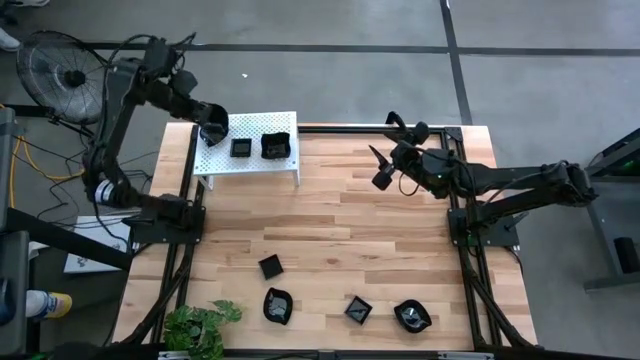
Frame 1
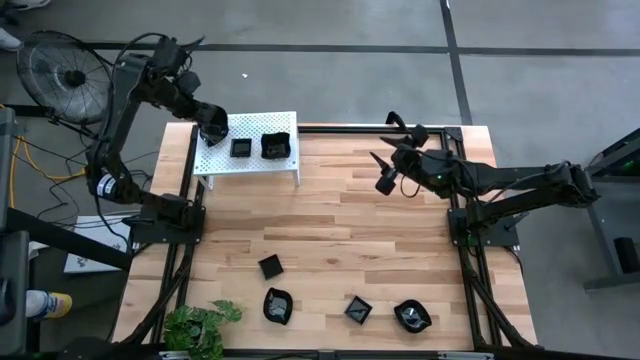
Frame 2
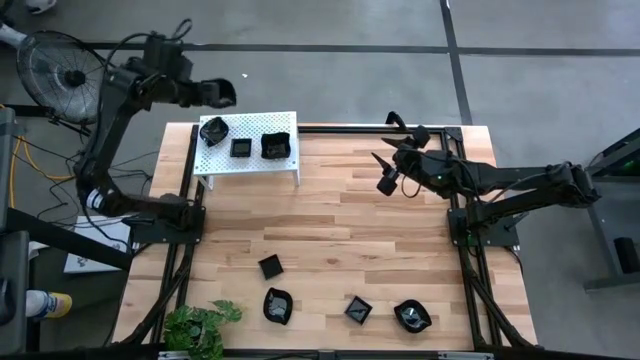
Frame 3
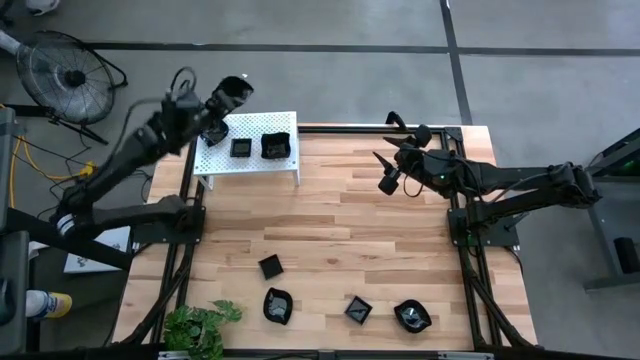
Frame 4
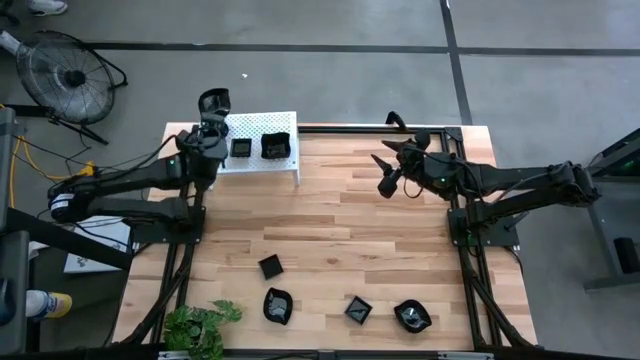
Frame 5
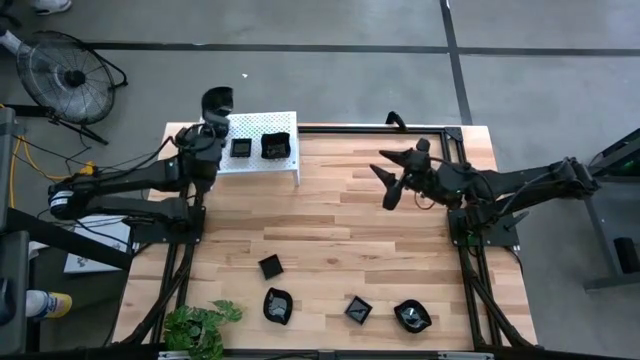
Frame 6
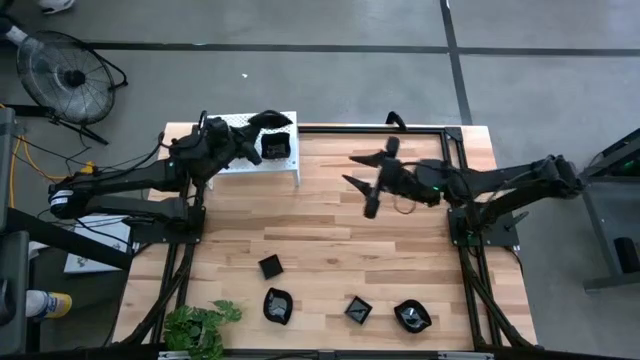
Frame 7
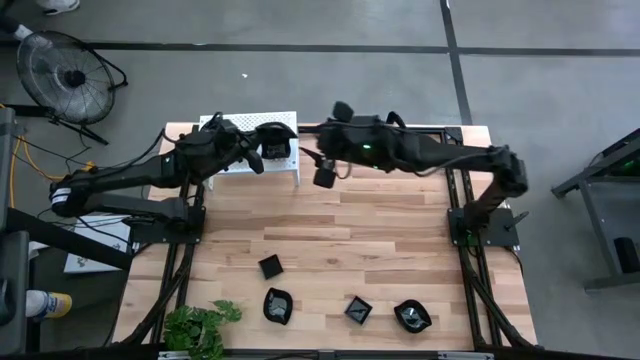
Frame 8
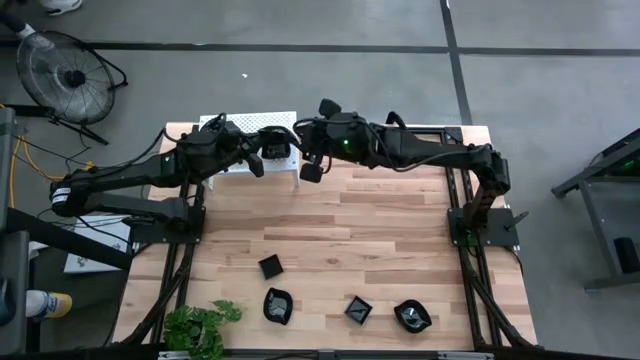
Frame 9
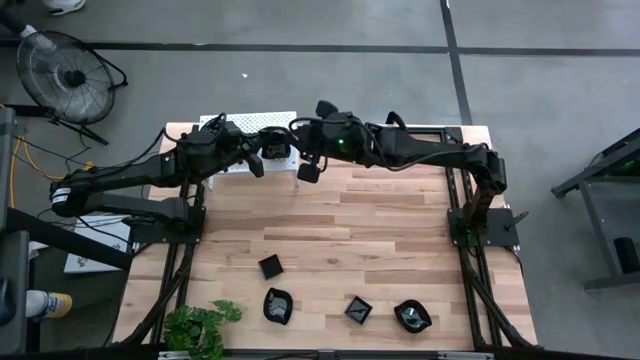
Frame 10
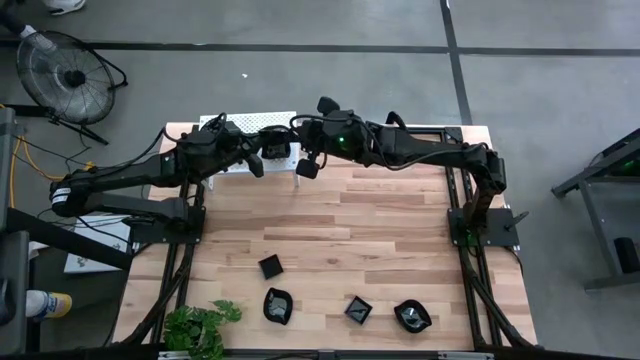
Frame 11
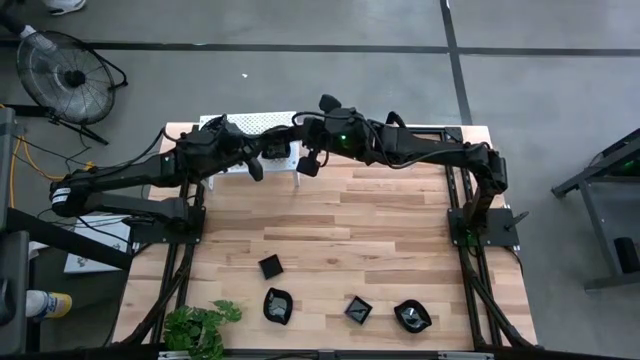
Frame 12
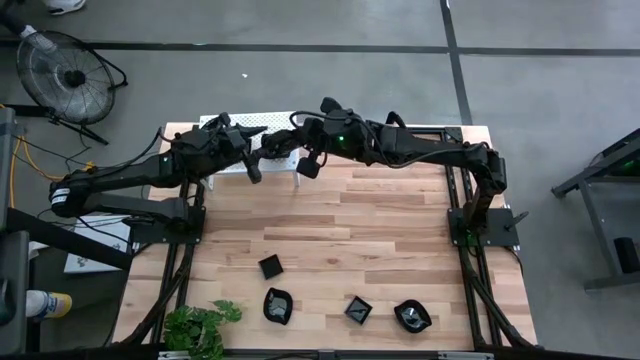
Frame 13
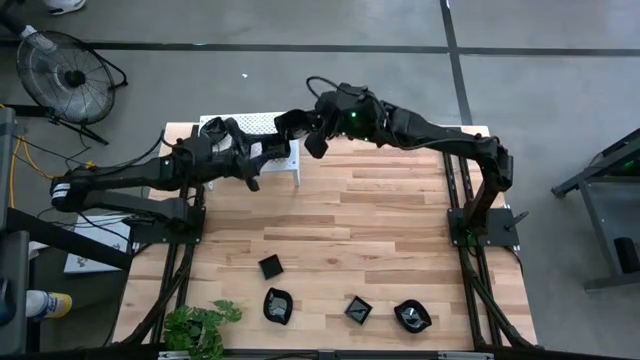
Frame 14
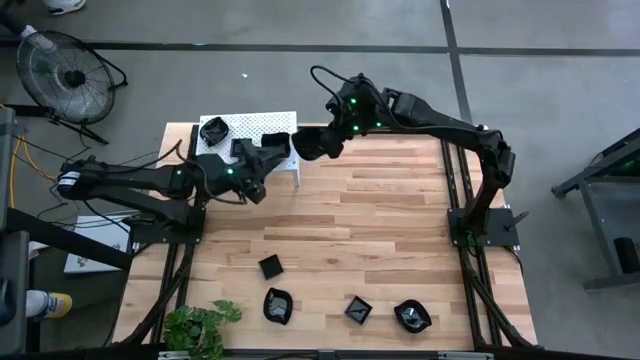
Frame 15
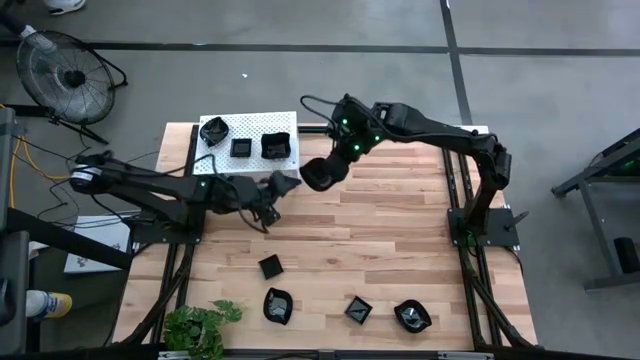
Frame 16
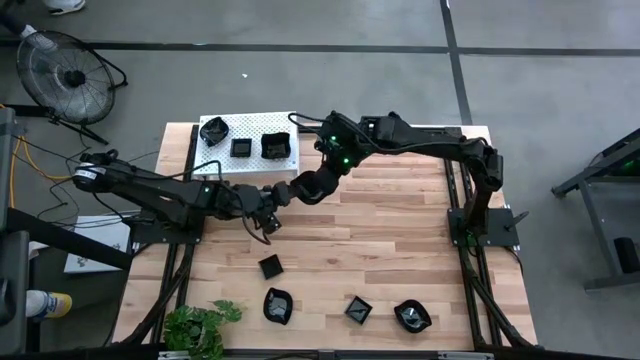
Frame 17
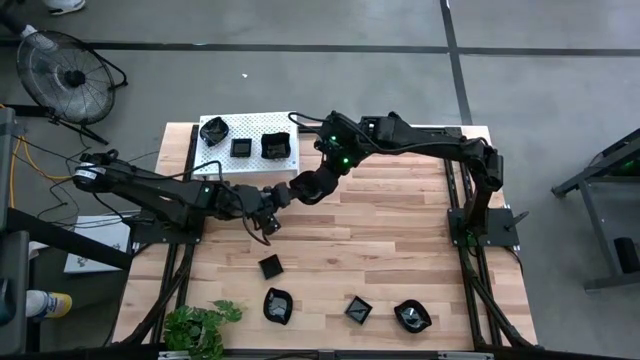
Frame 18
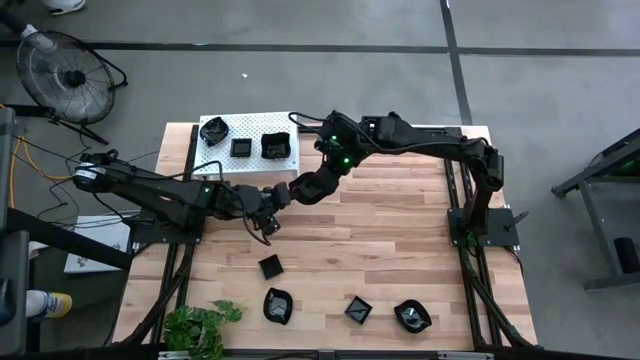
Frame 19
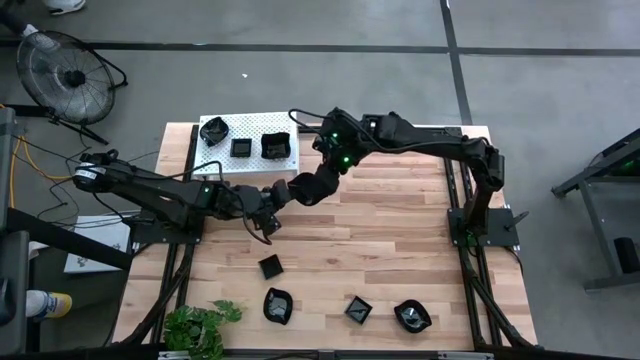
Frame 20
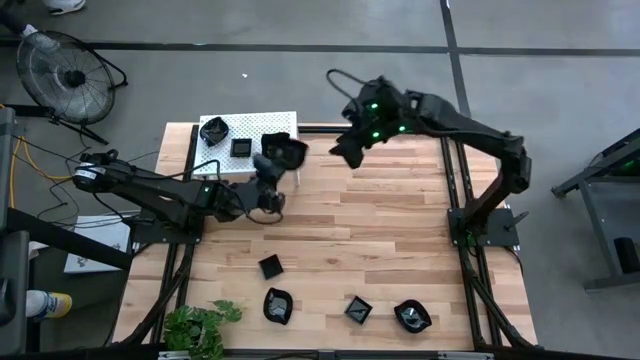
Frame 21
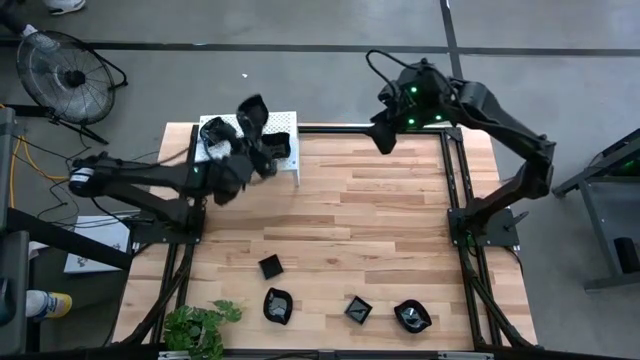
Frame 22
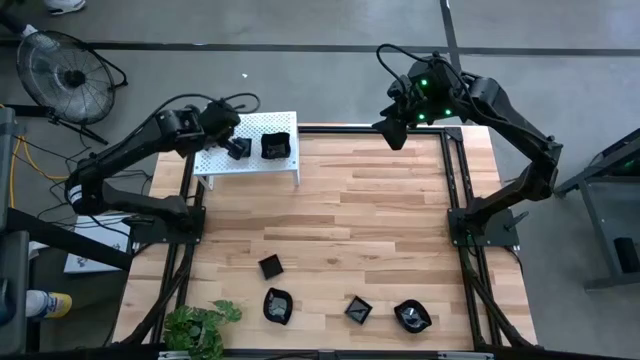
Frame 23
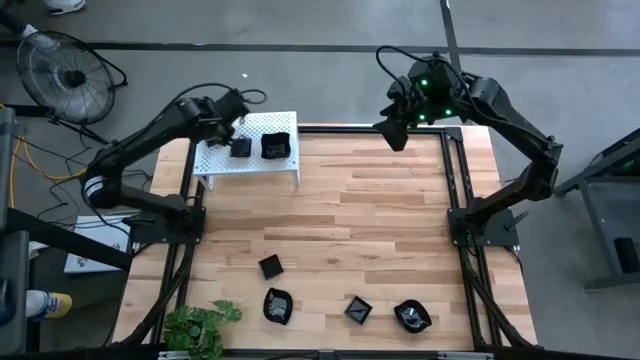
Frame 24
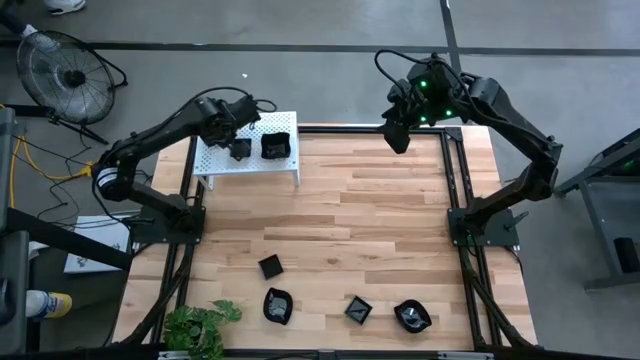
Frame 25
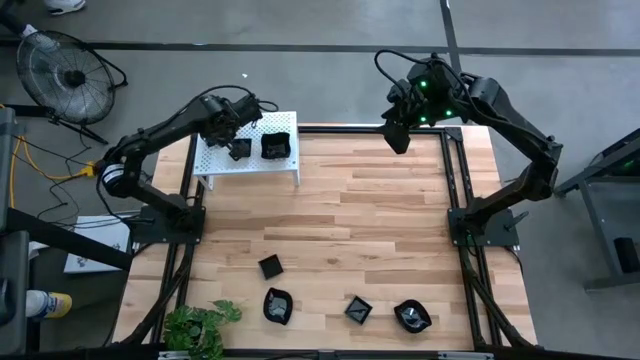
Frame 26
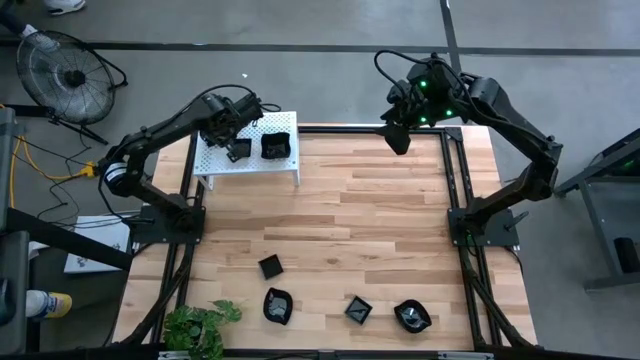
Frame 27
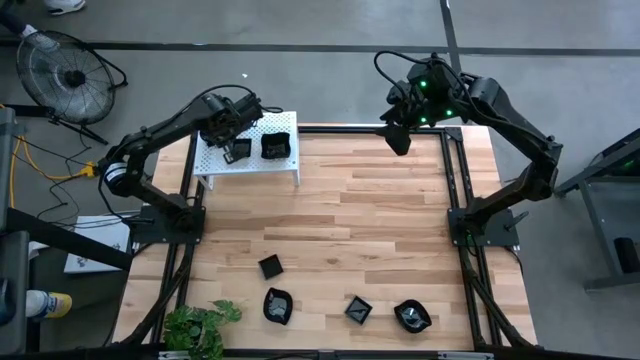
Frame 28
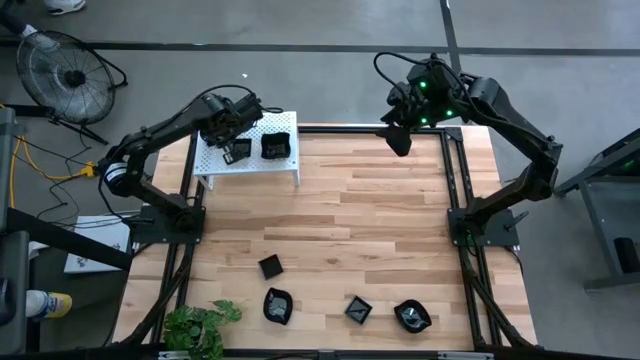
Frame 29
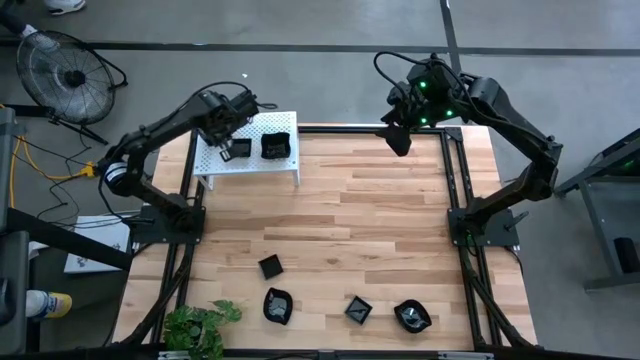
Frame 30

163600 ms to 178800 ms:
Task: Pick & Place Mini shaped plates
Stack the black leaf shaped plate on top of the black leaf shaped plate on the shelf

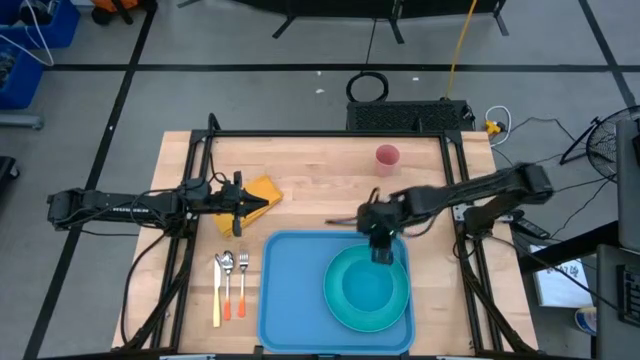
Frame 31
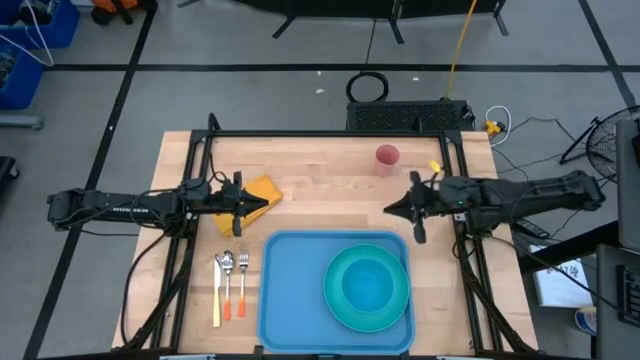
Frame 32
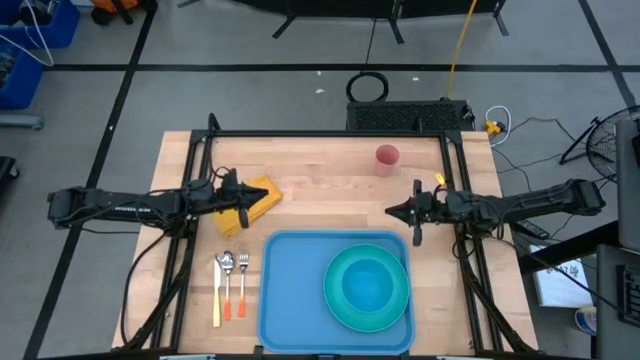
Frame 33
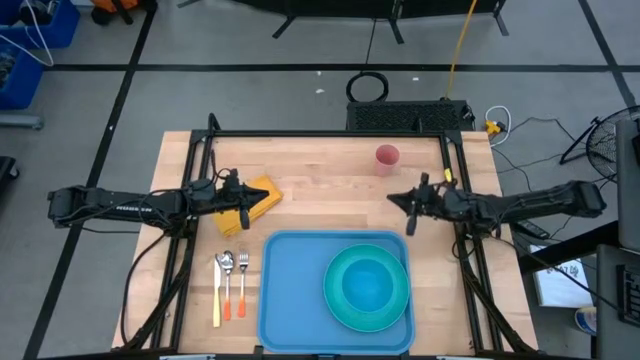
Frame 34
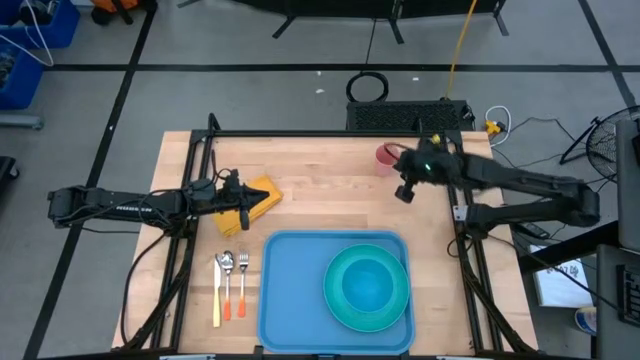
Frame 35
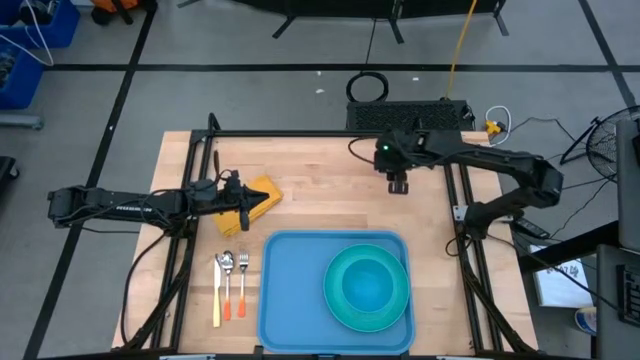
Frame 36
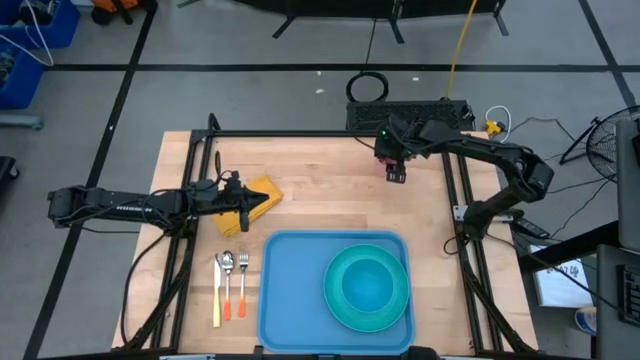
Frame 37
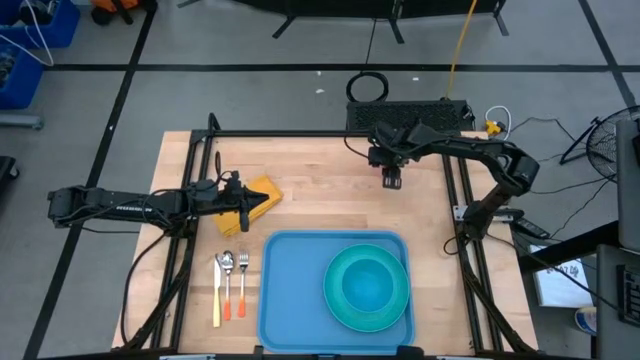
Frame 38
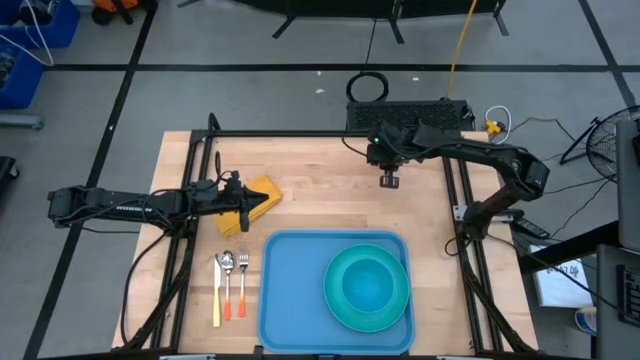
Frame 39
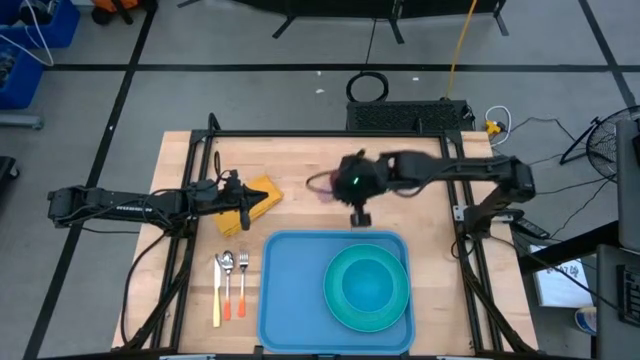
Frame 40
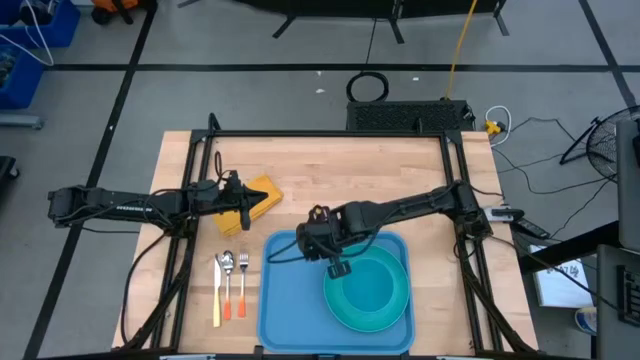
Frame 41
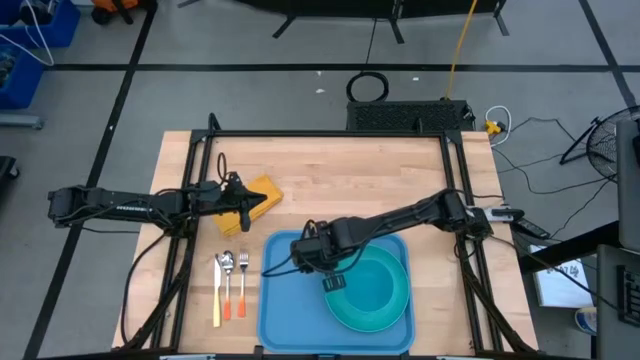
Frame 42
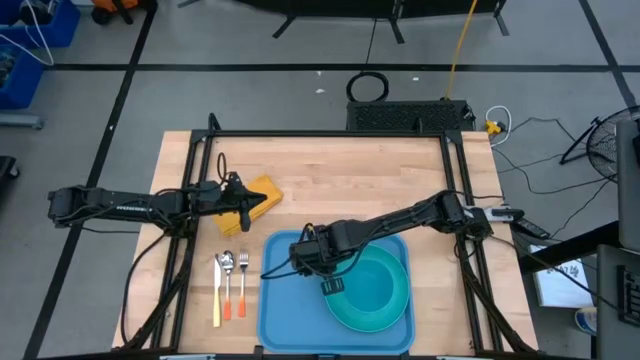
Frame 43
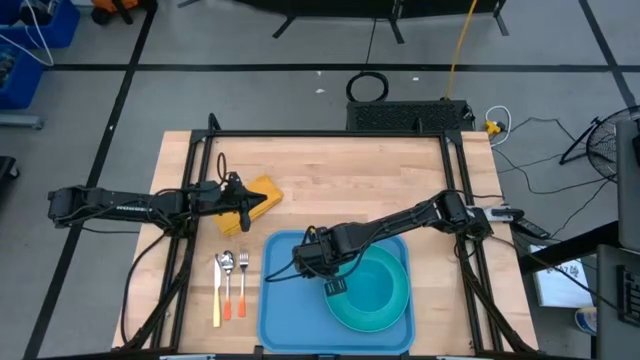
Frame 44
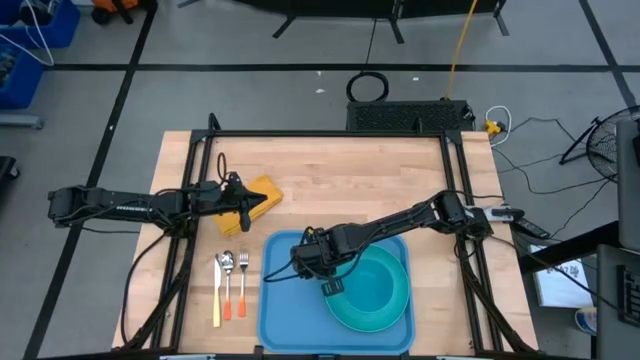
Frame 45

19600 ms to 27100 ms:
Task: Set up tray
Put the pink cup to the top left of the green plate on the blue tray
